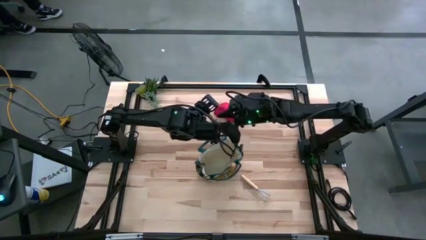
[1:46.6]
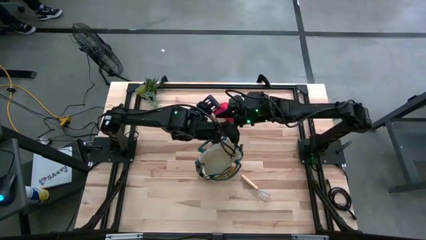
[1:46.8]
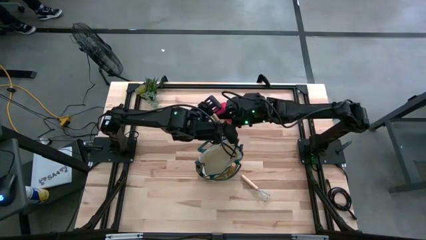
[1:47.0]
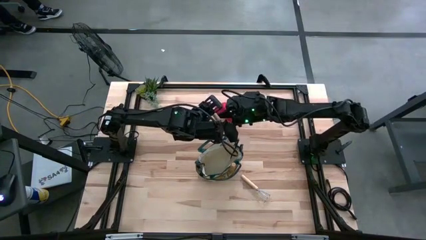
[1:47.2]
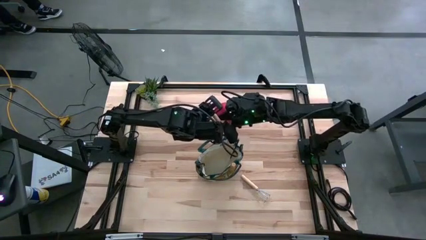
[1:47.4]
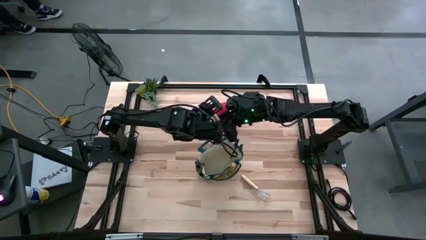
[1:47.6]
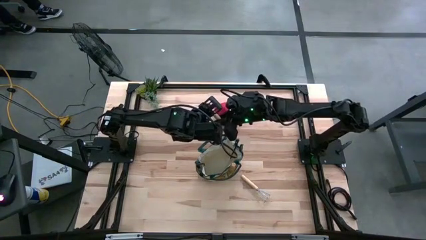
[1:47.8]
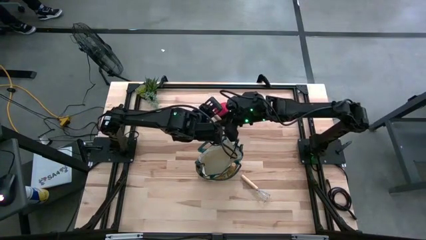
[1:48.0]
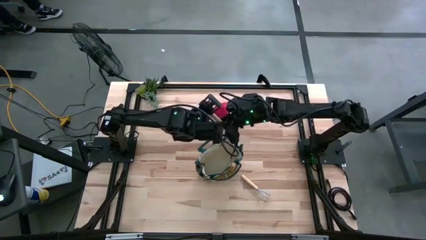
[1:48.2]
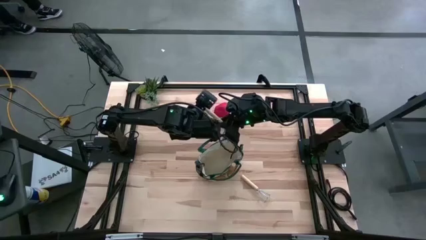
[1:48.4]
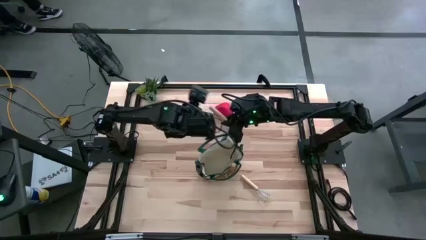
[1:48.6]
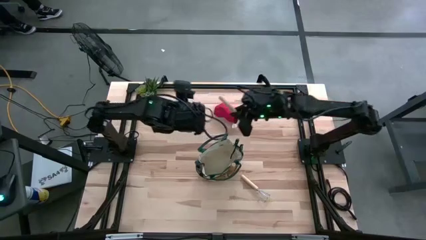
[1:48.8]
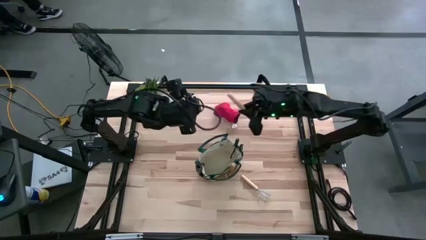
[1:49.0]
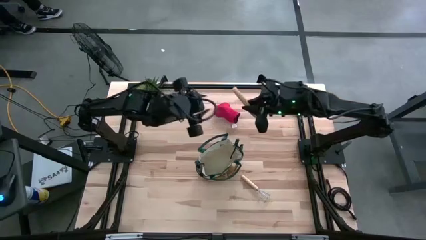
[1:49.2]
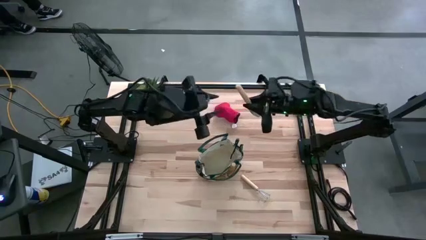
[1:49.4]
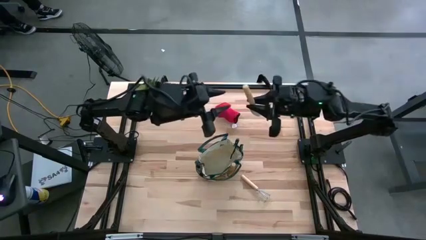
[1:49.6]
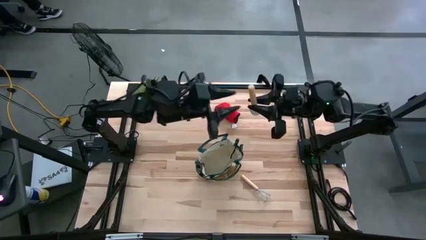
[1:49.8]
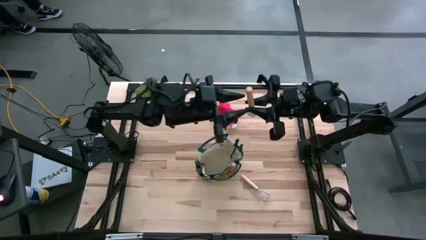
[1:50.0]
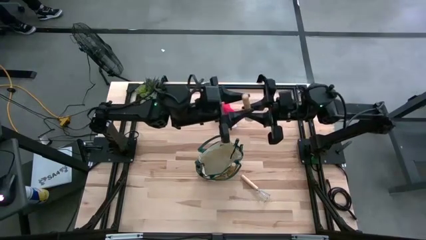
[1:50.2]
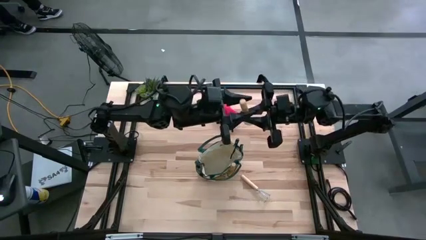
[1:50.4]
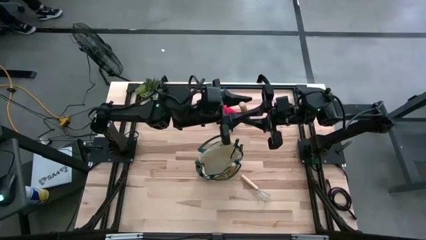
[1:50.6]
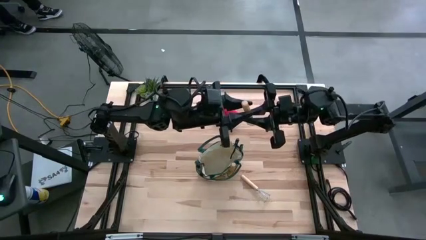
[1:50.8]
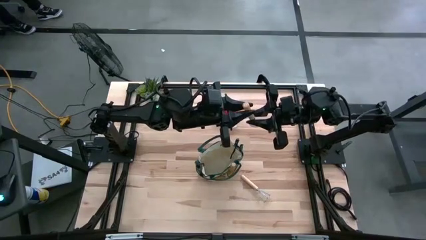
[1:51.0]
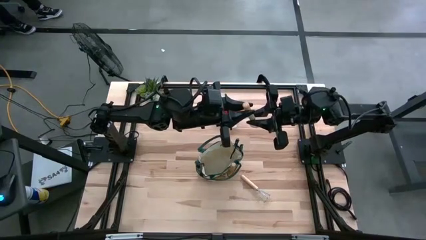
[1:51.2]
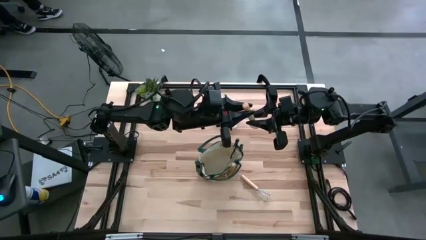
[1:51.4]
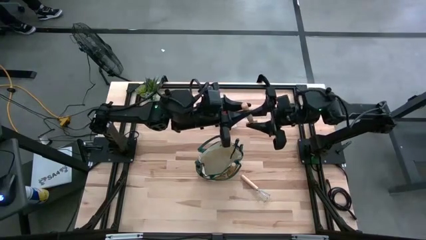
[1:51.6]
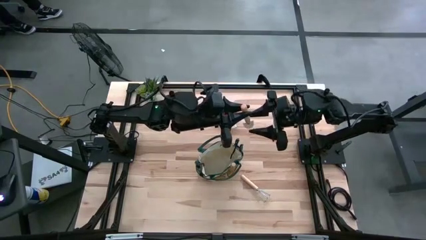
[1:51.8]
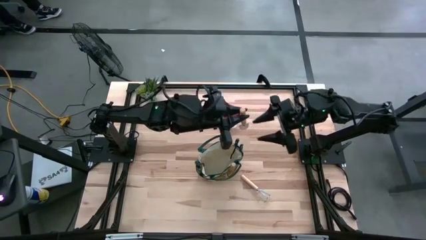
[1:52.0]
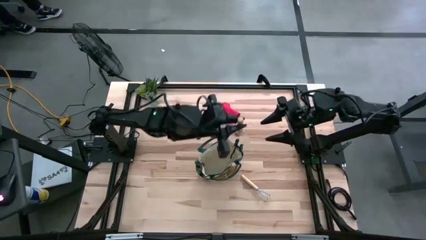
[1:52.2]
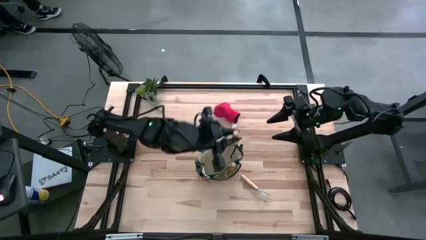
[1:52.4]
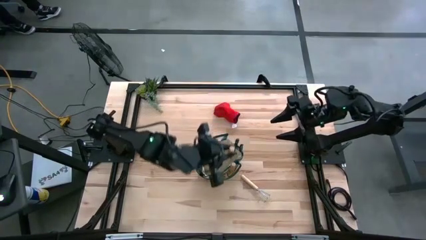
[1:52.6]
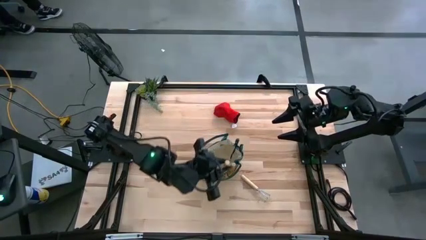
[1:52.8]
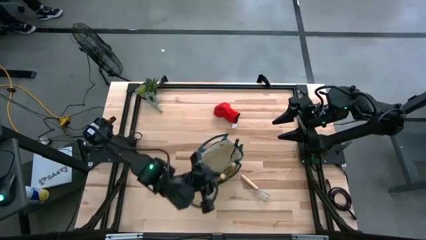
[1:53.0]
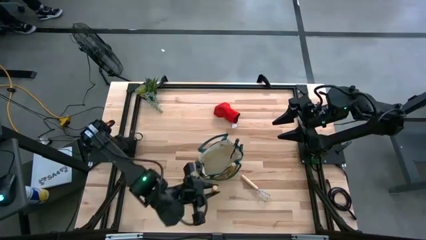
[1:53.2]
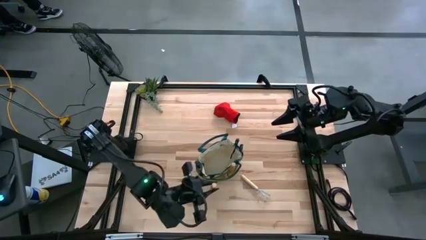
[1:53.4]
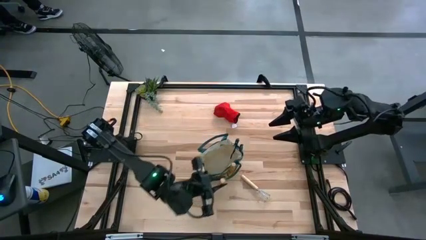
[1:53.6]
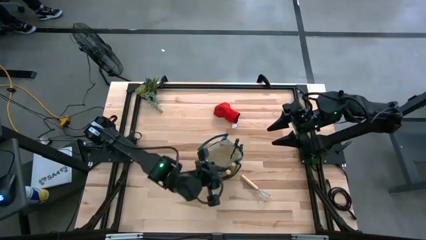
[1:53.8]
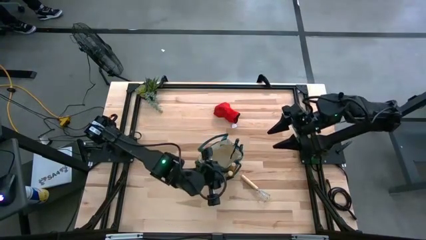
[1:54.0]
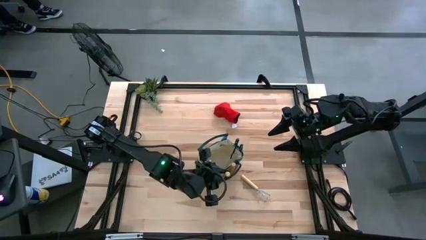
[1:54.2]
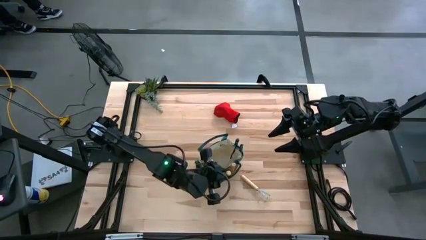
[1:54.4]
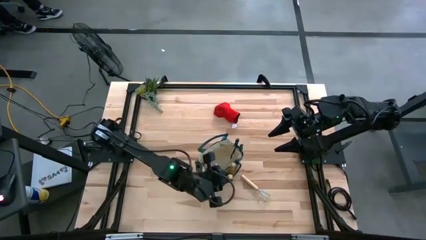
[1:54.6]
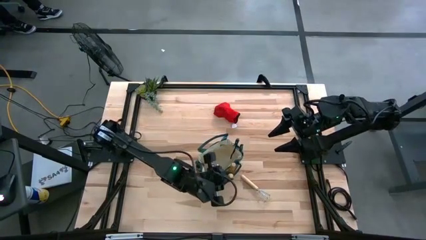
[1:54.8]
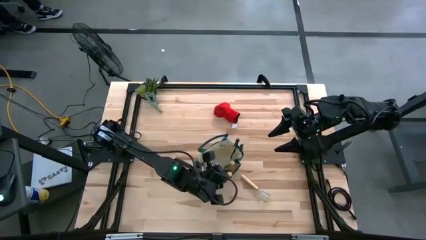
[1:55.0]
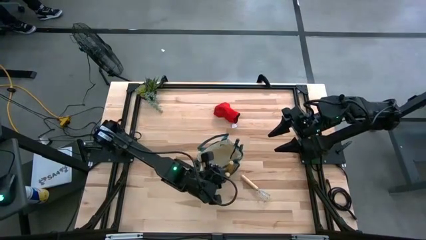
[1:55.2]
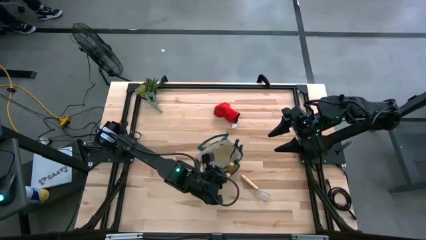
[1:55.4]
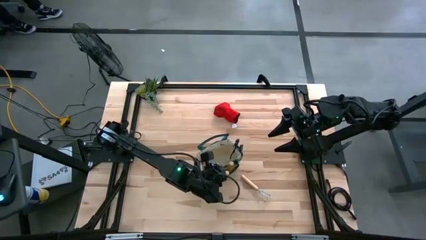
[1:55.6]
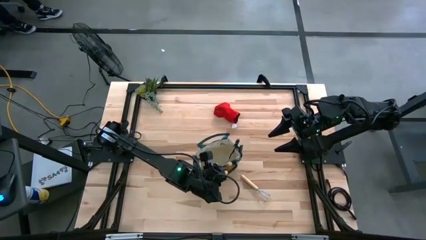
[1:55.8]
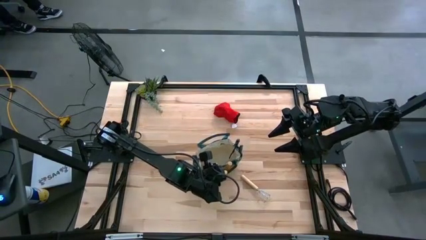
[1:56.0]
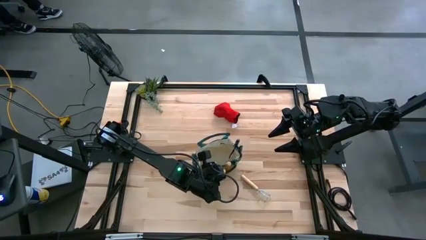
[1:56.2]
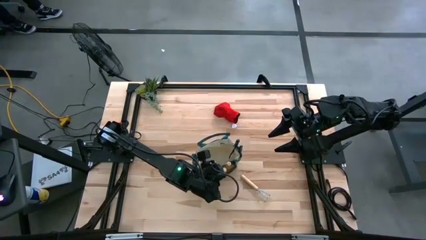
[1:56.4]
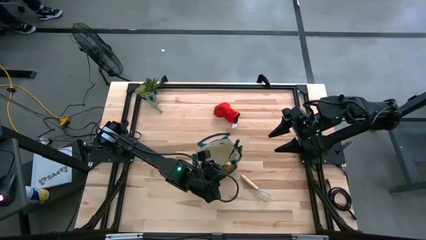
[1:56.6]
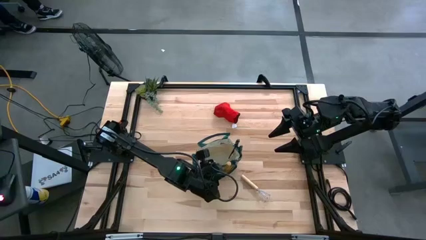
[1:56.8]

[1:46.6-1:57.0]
Task: Pick & Place Garden tools in Gardening bag
Put the brown trowel into the white gardening bag

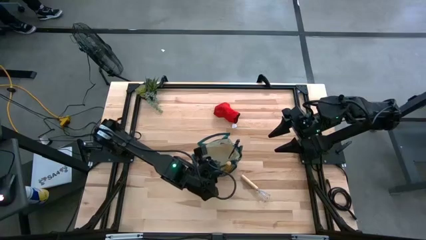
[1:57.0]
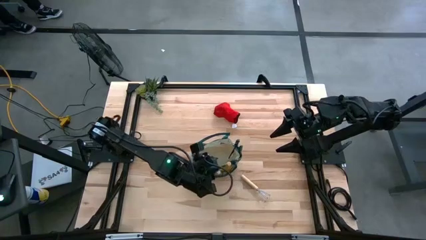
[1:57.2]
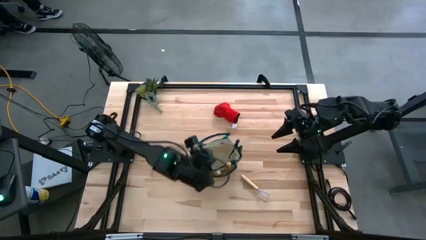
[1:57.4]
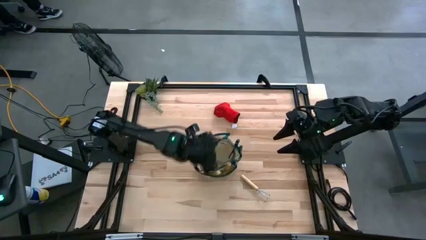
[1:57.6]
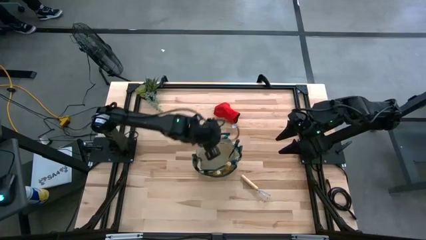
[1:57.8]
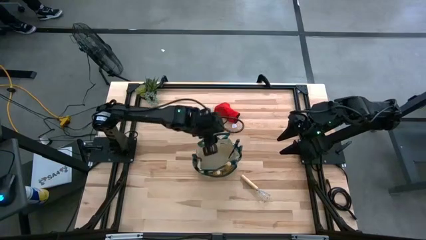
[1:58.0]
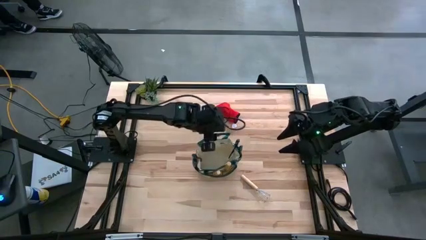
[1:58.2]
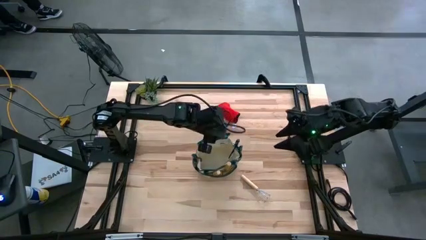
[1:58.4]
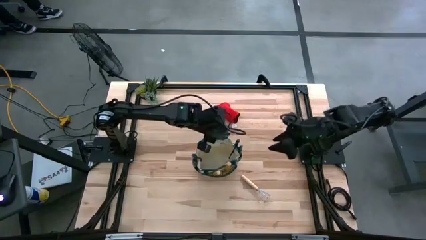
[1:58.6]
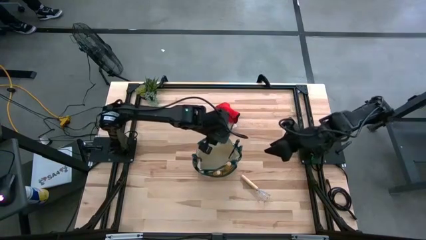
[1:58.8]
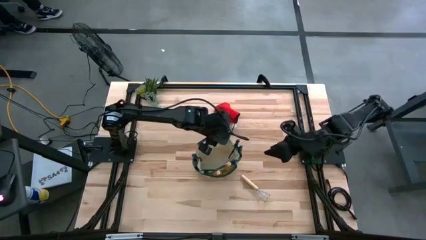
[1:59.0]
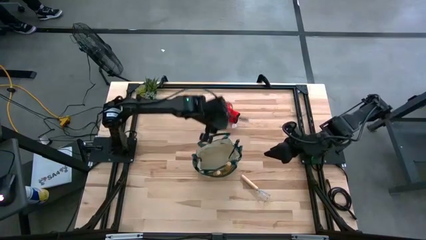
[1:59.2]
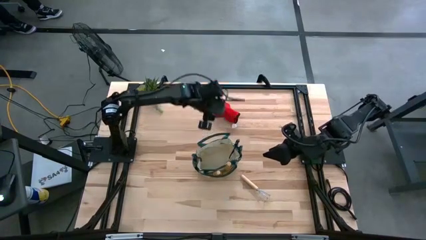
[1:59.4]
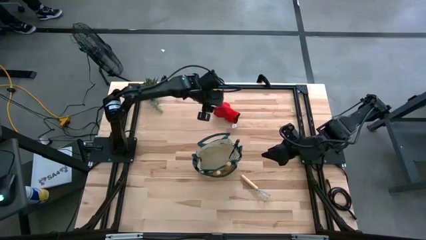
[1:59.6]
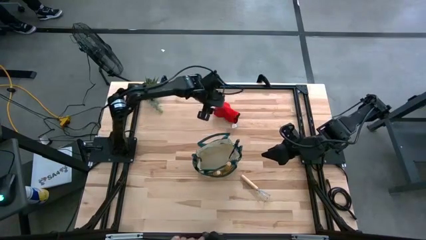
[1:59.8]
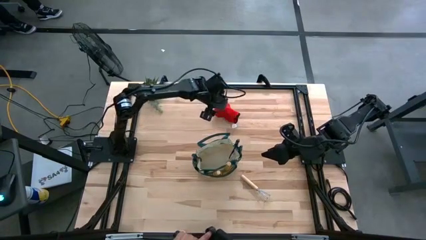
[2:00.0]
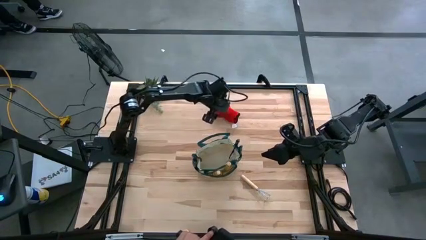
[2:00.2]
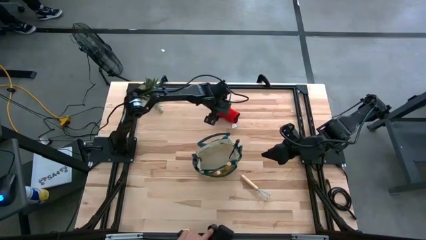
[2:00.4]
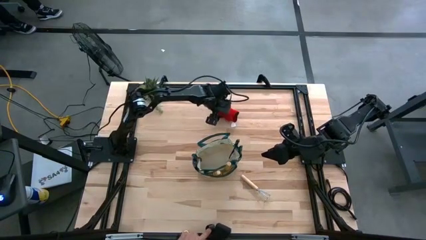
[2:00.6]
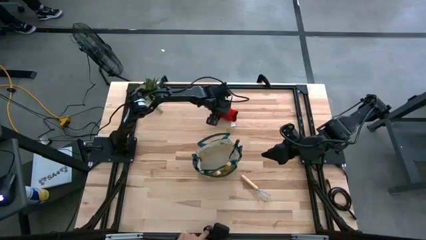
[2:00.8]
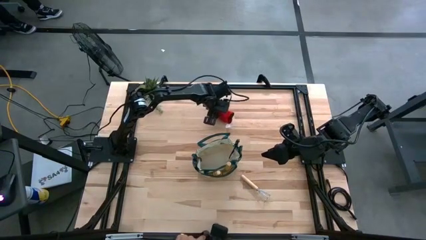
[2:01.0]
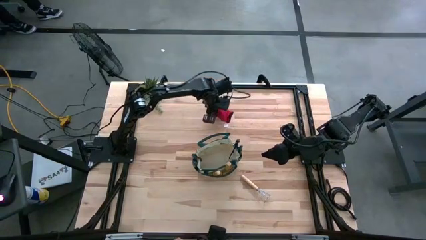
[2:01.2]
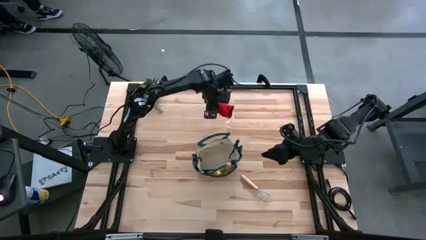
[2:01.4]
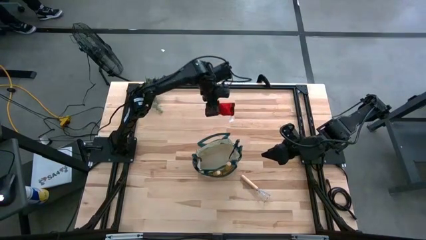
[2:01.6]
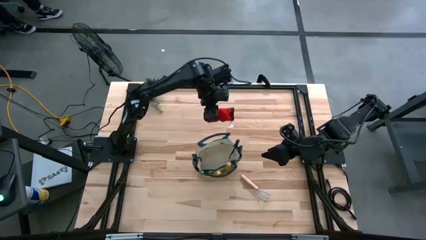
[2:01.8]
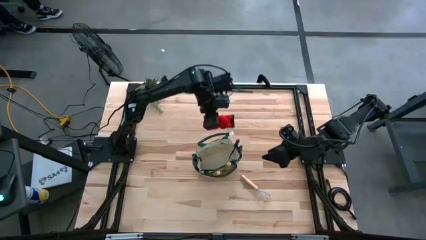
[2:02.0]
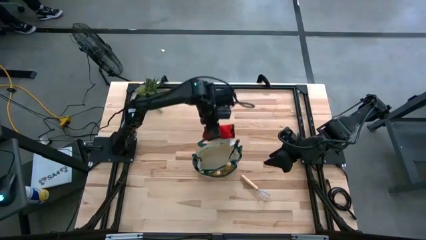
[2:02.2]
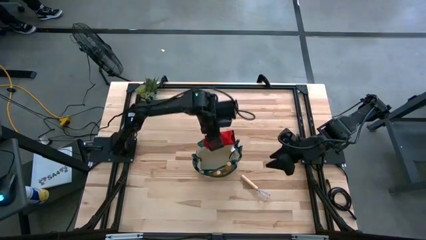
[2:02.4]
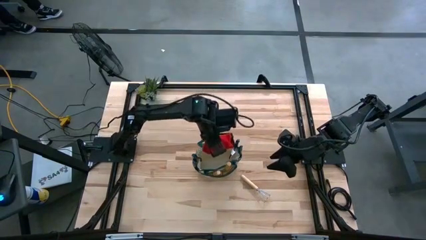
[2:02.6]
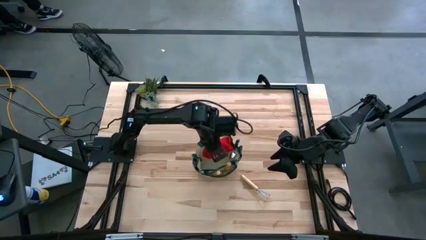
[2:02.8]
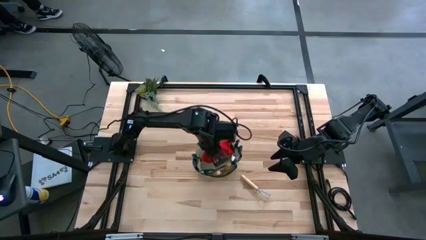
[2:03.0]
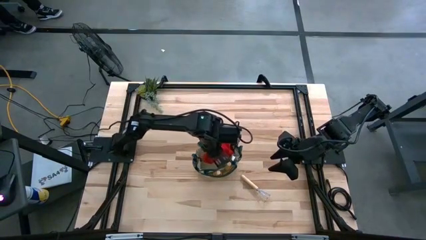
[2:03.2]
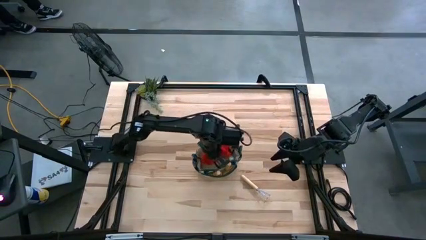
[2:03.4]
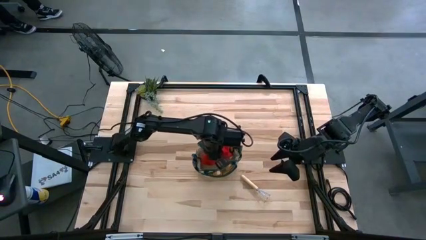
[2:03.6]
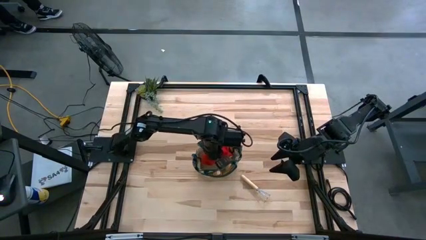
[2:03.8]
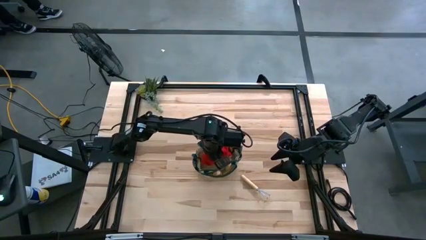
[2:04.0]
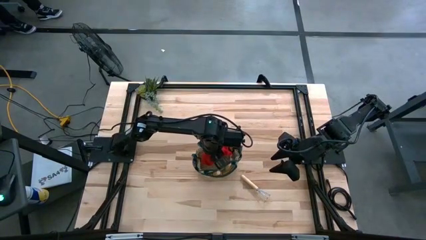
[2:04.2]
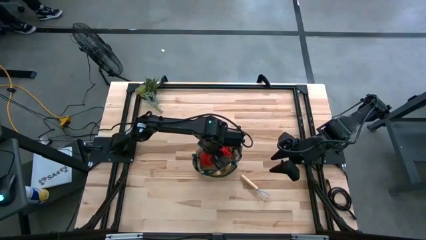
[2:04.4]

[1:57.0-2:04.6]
Put the red gloves into the white gardening bag
